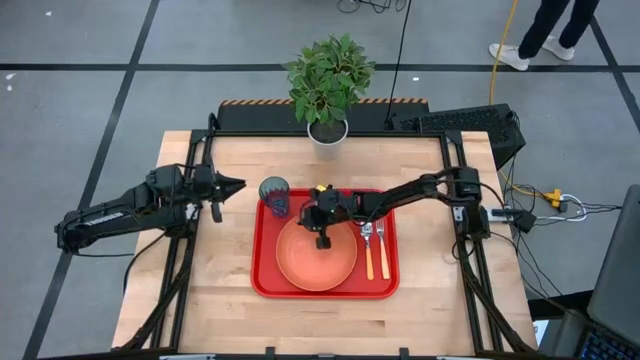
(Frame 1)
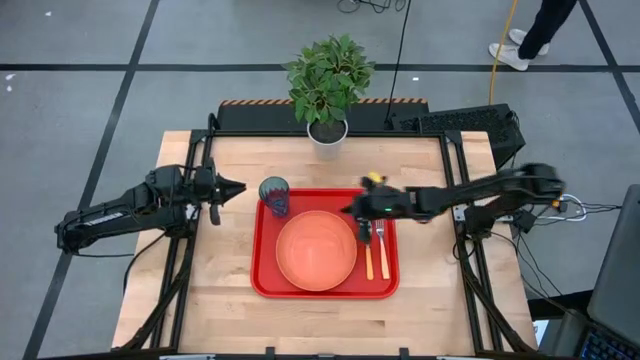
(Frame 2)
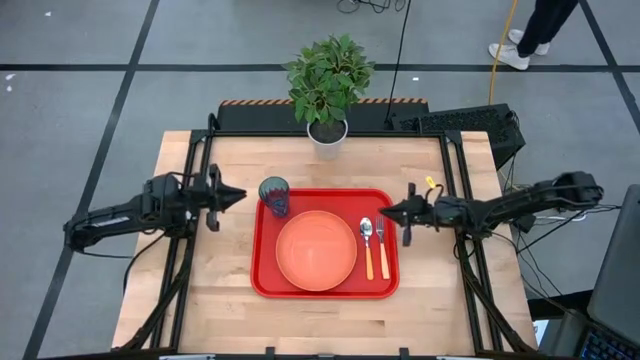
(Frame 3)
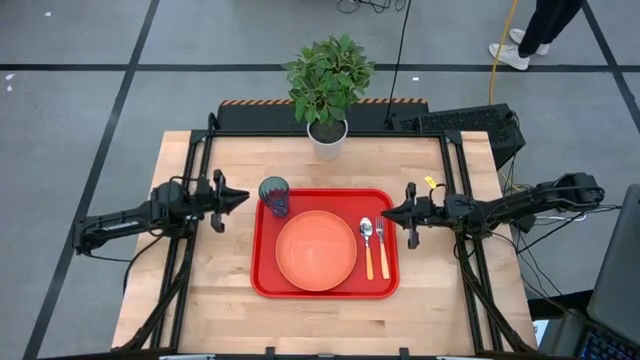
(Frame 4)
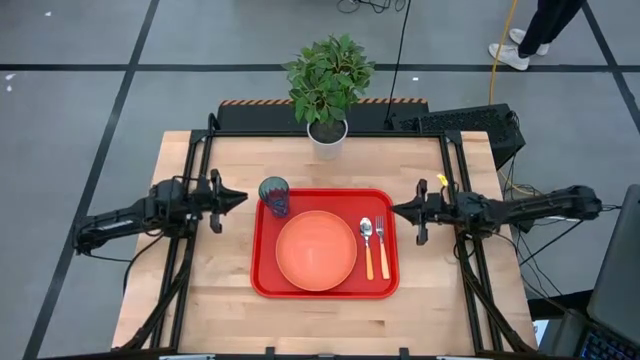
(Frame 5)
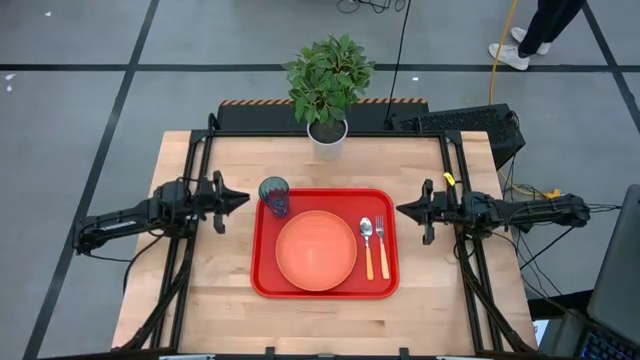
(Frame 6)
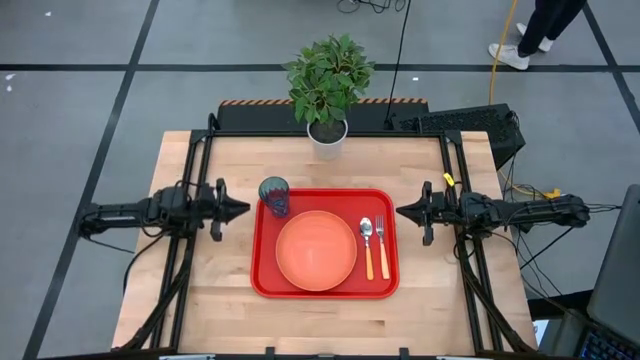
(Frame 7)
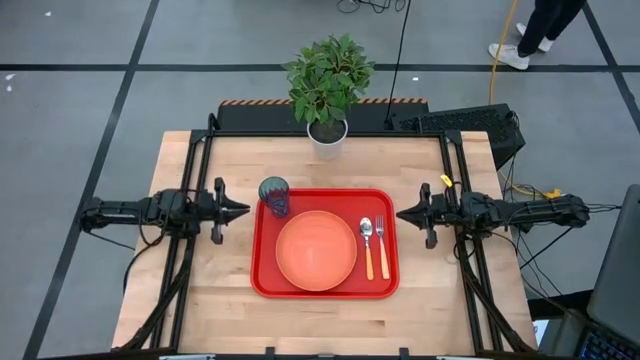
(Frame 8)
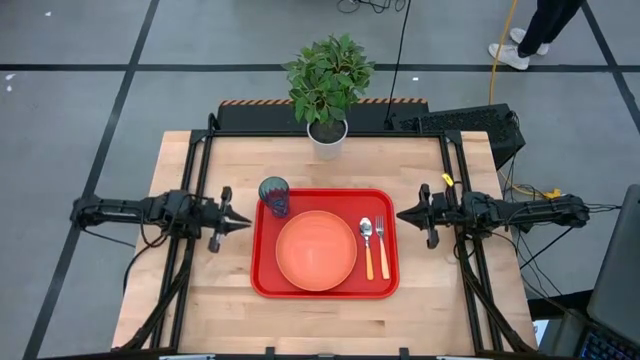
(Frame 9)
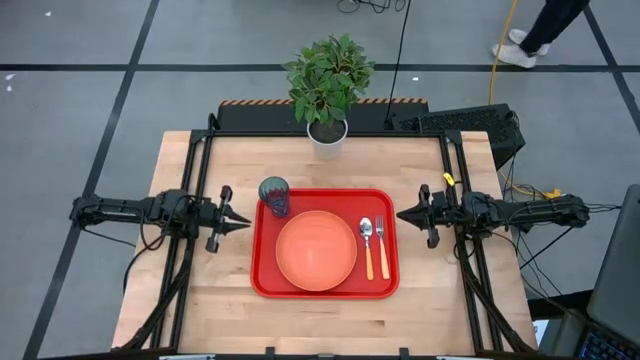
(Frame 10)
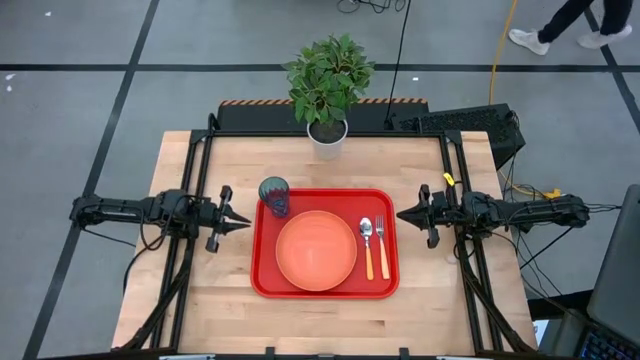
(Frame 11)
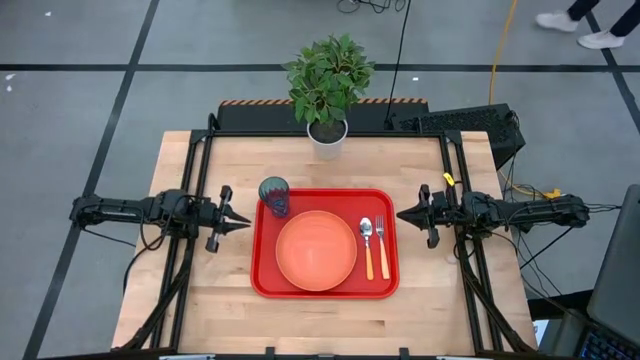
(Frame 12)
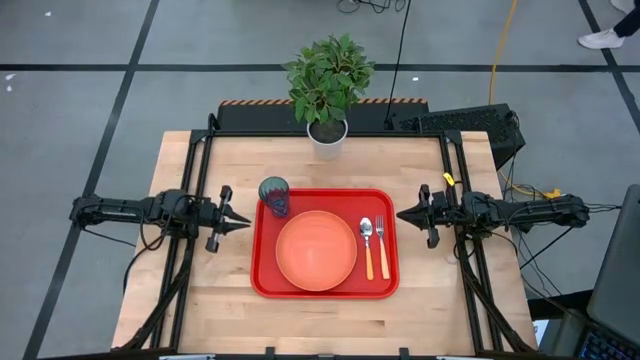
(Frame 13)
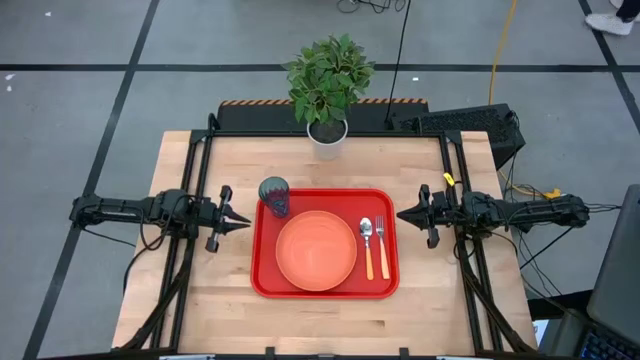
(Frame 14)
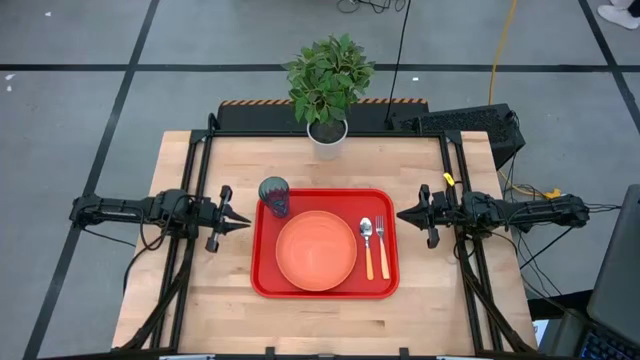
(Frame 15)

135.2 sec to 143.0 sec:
Task: Pick and place plate/cup/fork/spoon on tray
Return to Home Position

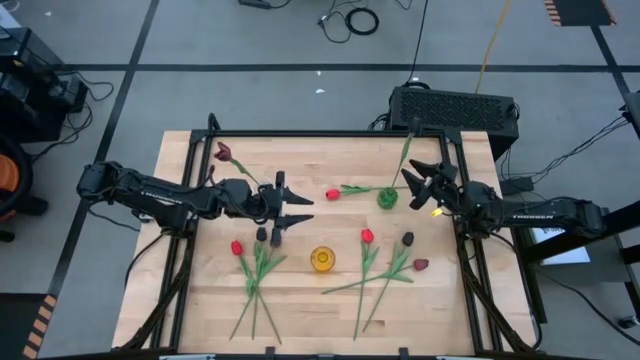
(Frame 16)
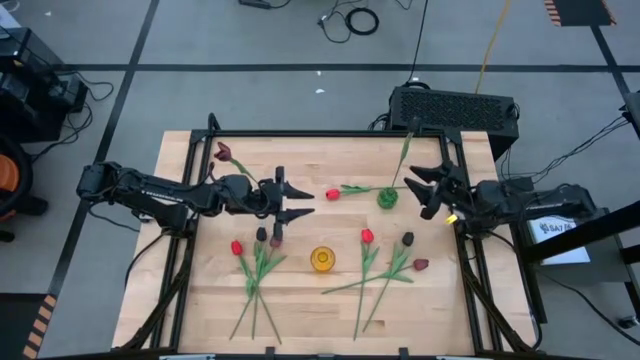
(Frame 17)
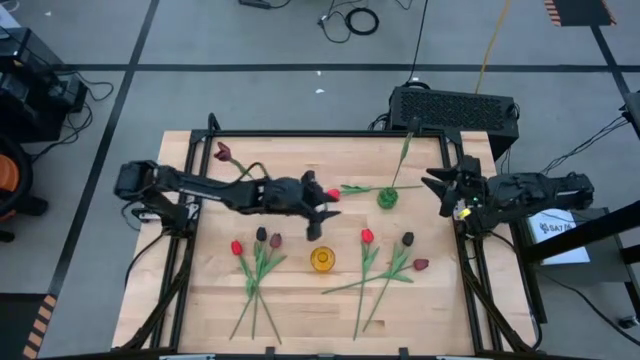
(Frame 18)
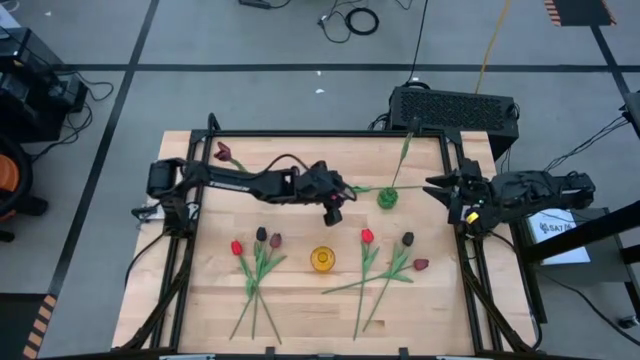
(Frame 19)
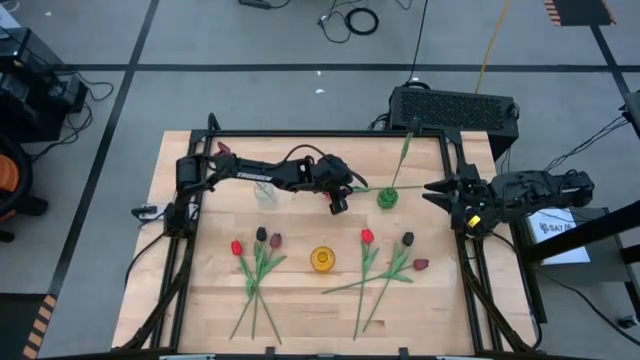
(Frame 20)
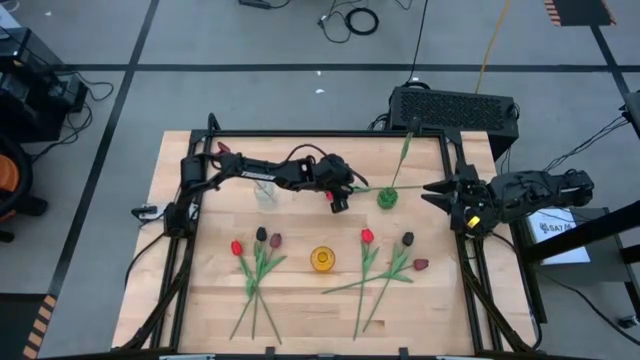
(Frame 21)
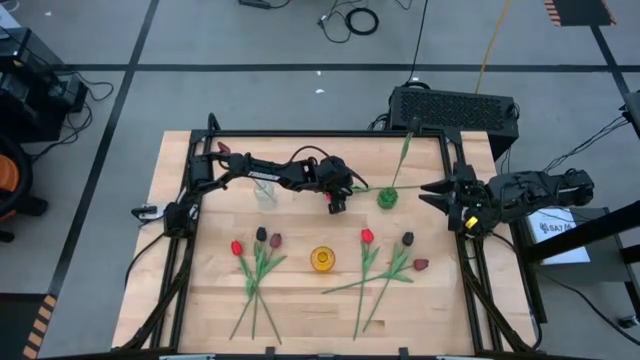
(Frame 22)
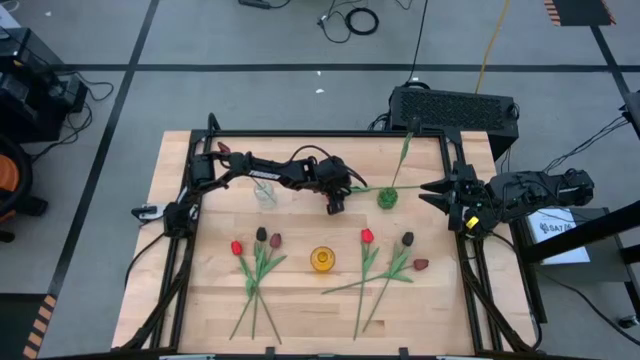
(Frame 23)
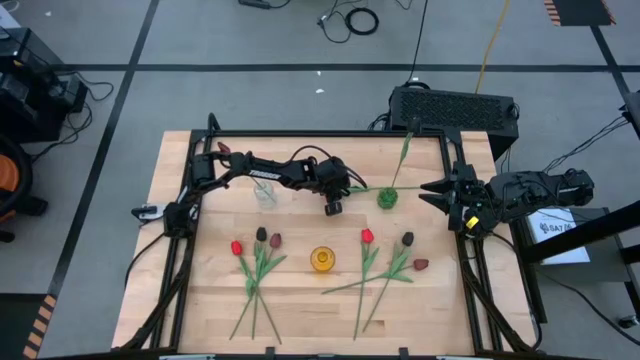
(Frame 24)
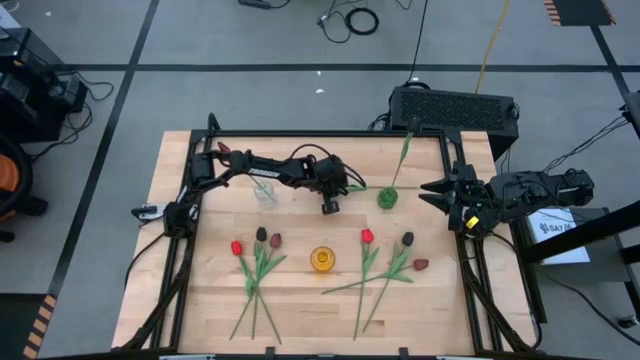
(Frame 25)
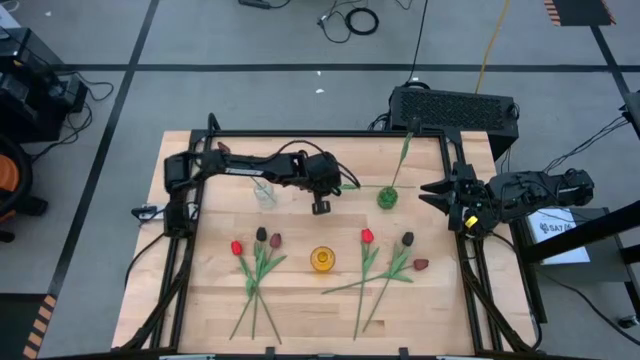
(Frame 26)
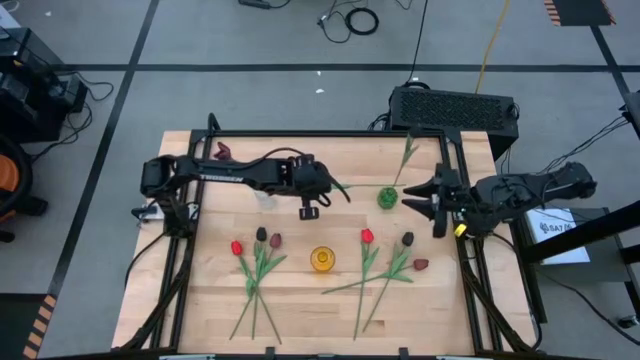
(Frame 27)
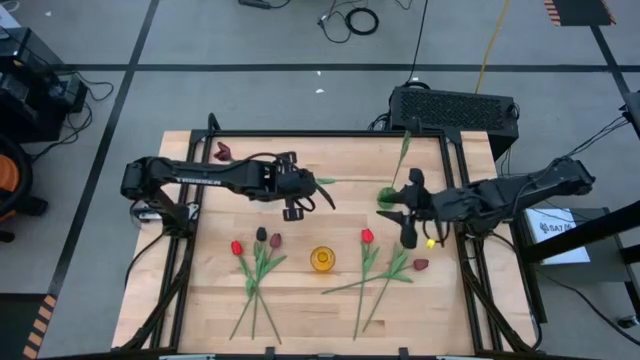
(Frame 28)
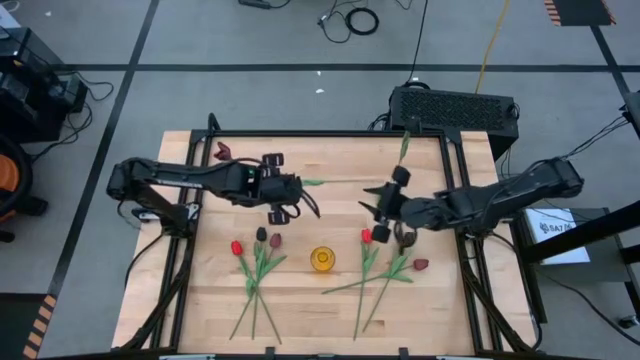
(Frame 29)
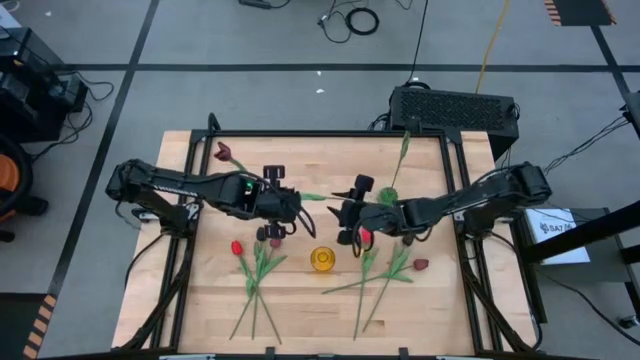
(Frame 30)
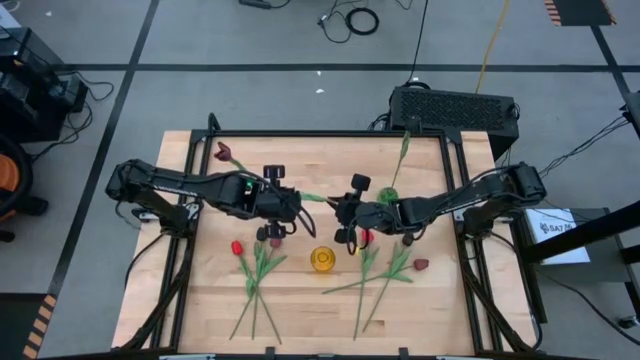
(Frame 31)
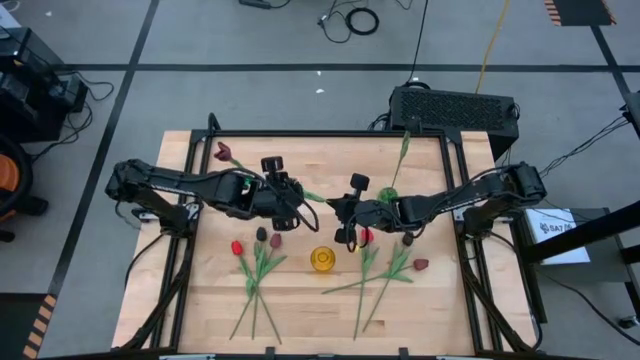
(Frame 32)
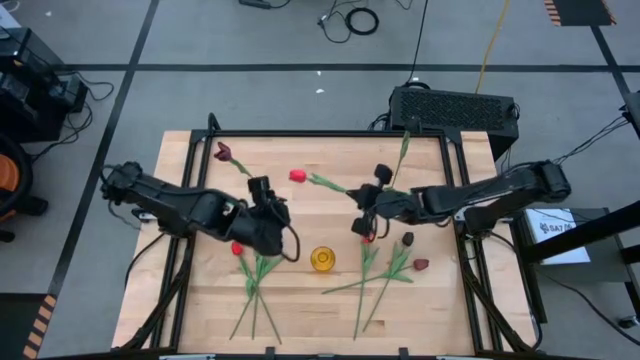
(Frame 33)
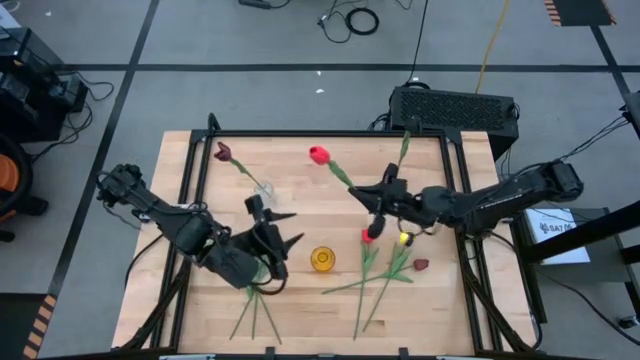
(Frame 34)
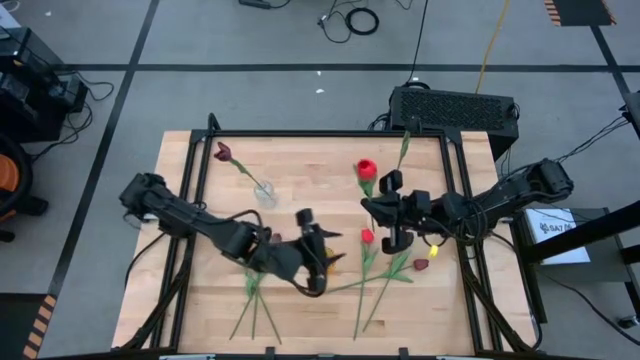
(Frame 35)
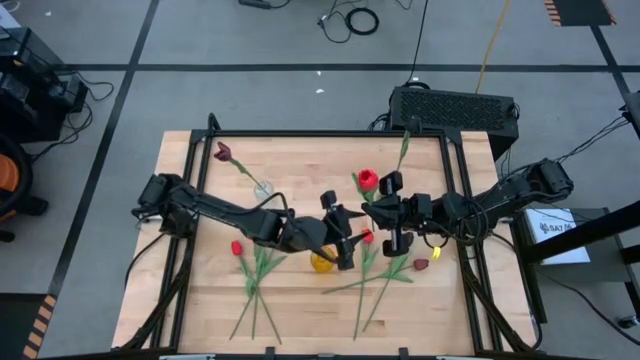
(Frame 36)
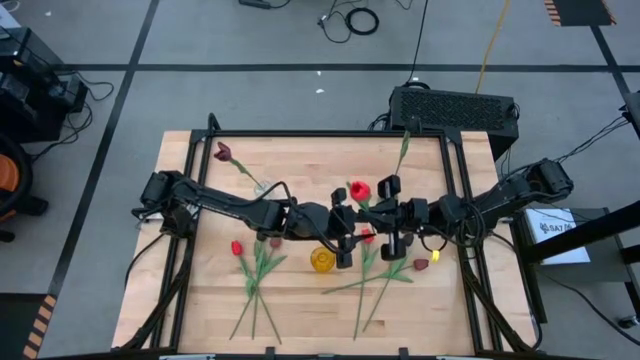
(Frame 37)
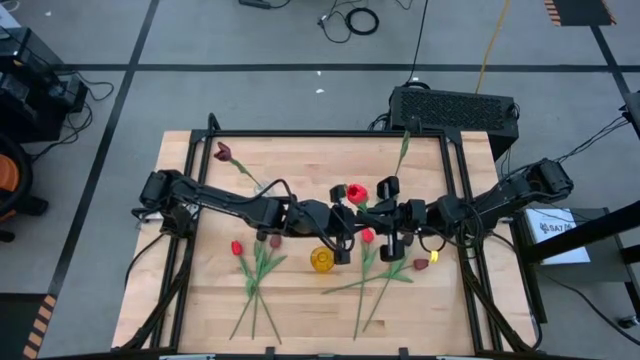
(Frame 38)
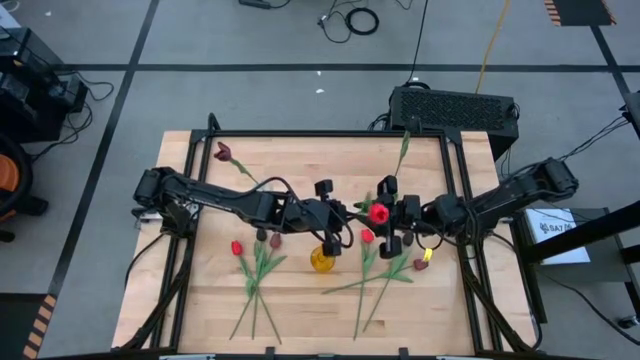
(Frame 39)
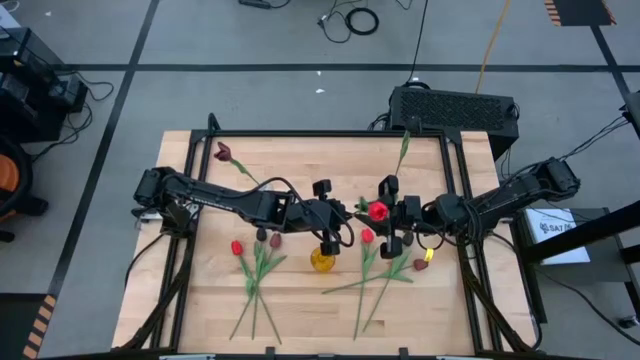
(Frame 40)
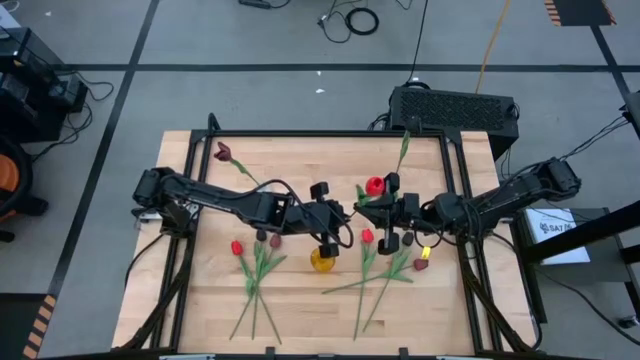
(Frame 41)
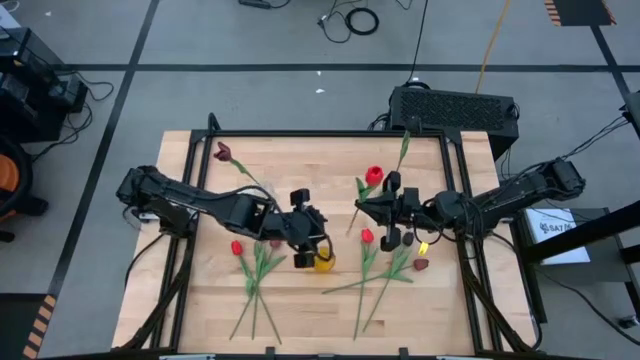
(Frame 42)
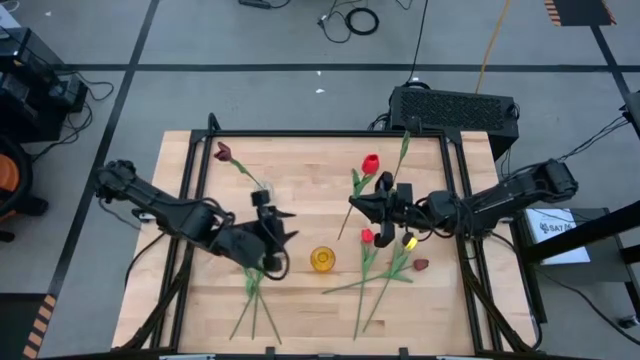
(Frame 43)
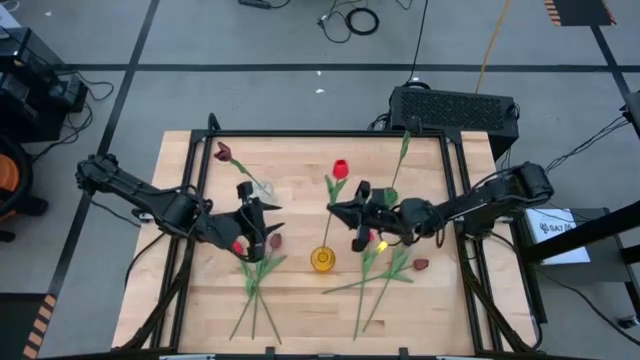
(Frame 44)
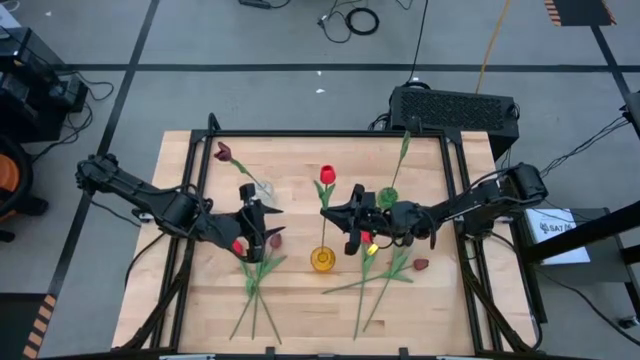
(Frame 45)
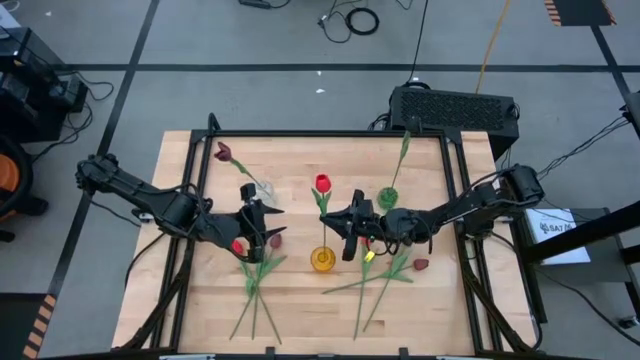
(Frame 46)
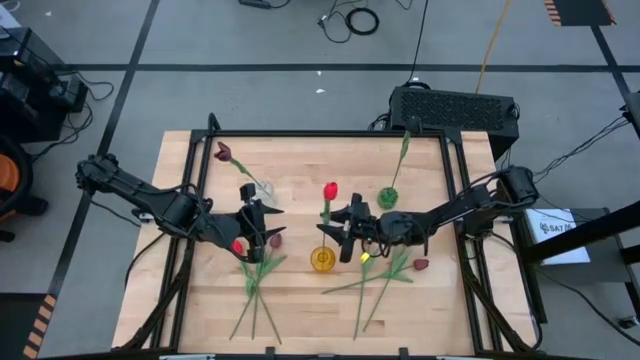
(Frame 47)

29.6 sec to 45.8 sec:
Task: Sort flowers into vase by color
Put the top red flower into the yellow vase
